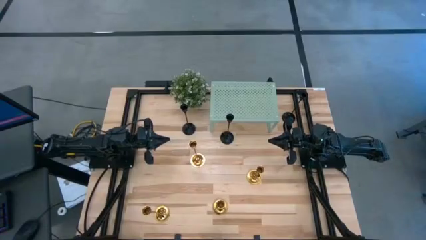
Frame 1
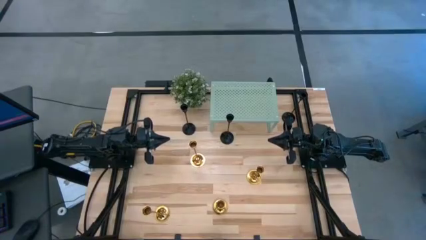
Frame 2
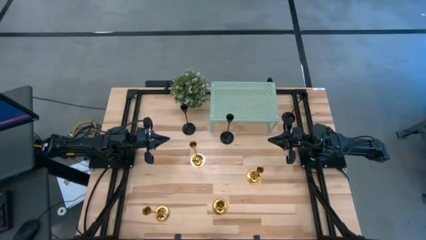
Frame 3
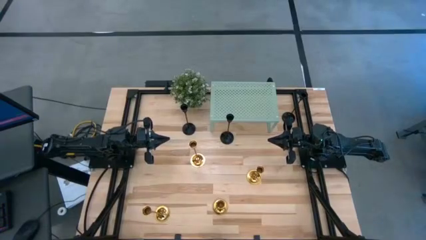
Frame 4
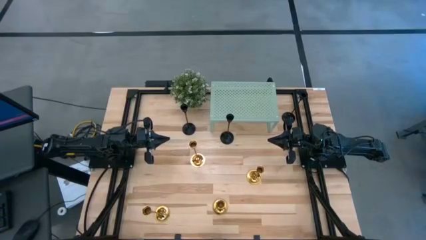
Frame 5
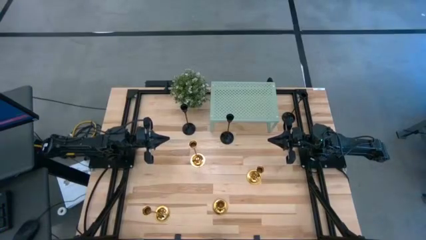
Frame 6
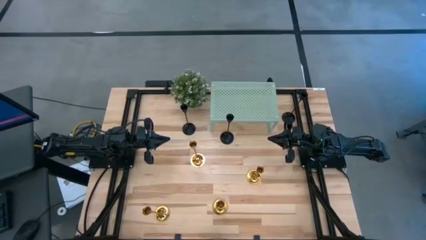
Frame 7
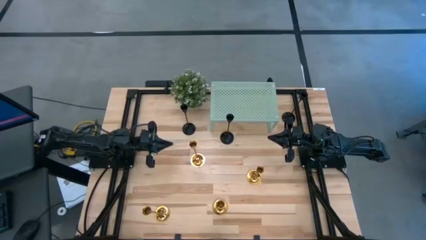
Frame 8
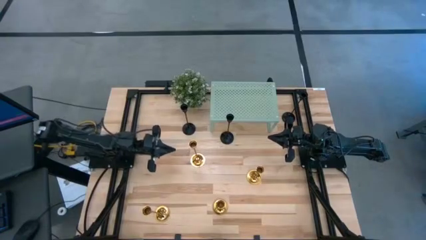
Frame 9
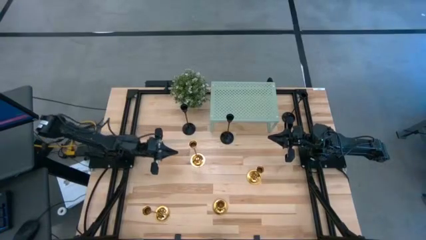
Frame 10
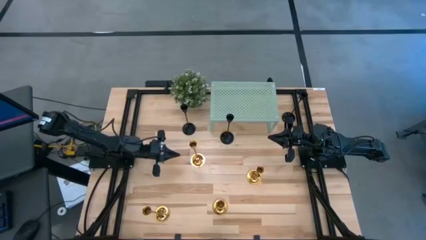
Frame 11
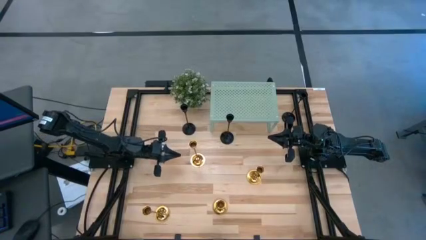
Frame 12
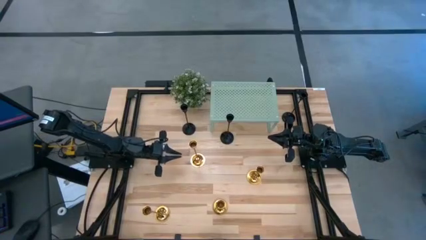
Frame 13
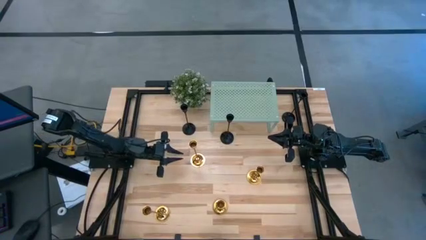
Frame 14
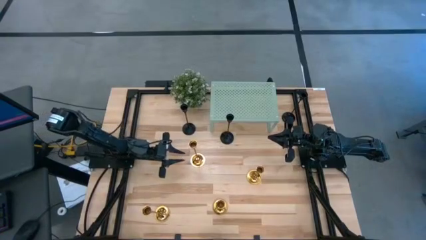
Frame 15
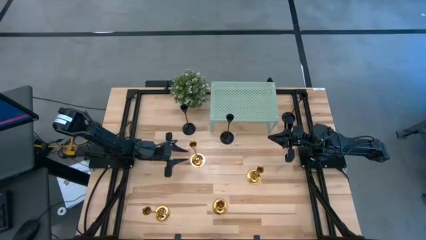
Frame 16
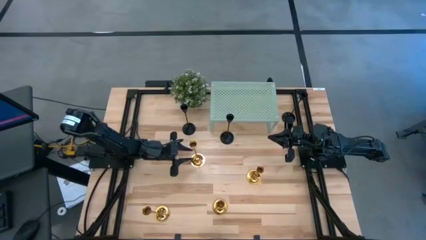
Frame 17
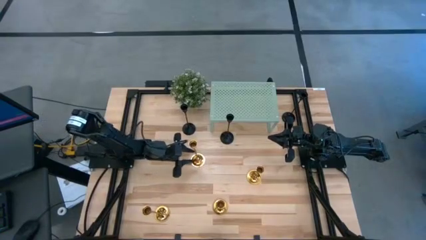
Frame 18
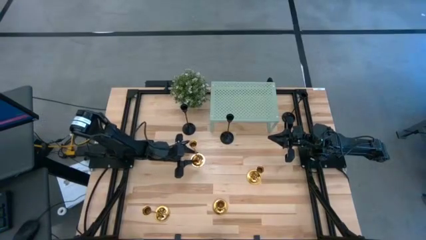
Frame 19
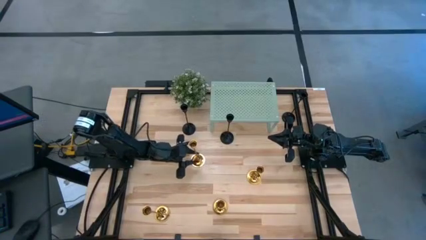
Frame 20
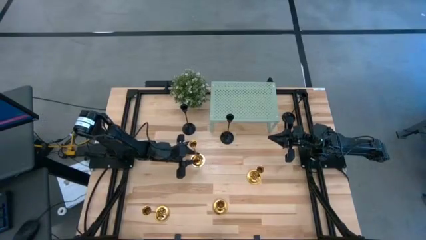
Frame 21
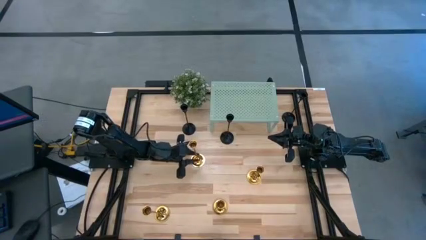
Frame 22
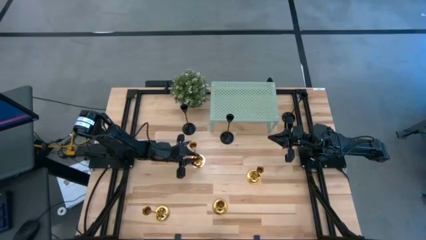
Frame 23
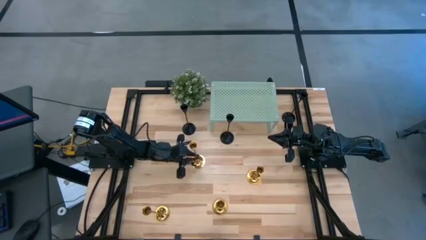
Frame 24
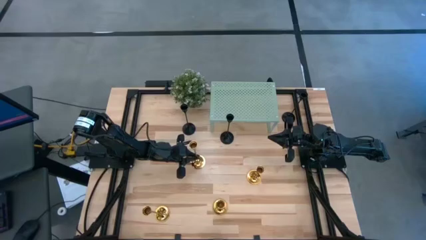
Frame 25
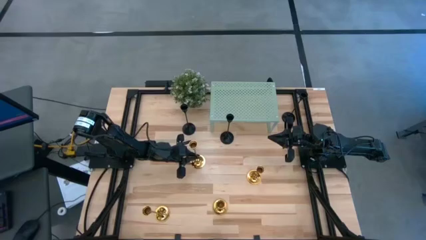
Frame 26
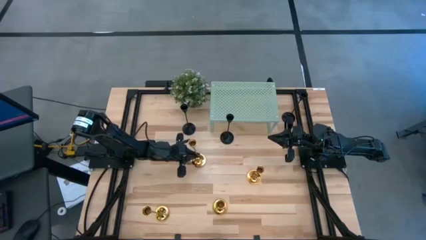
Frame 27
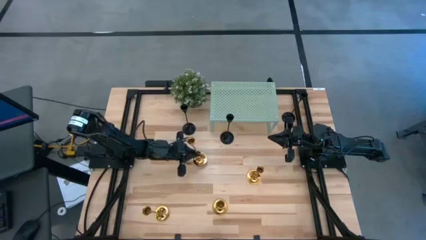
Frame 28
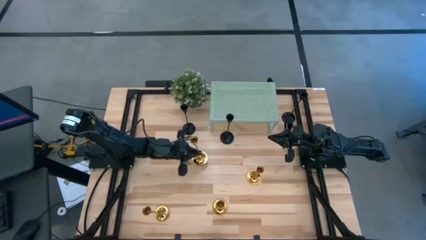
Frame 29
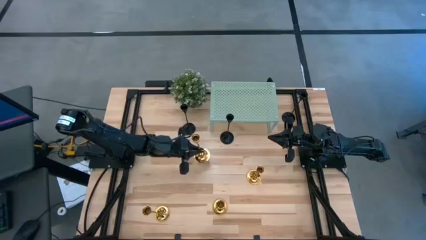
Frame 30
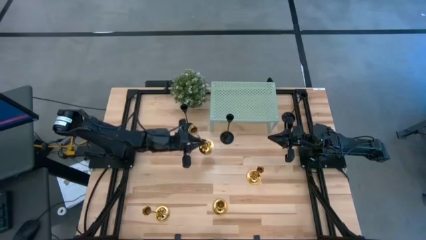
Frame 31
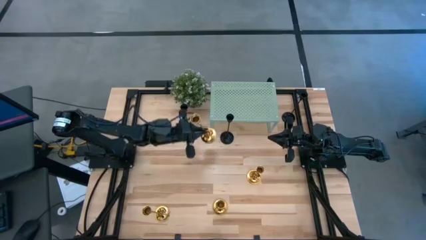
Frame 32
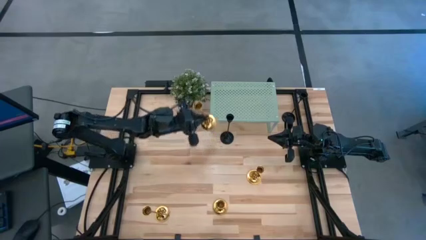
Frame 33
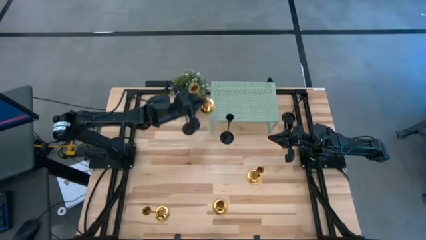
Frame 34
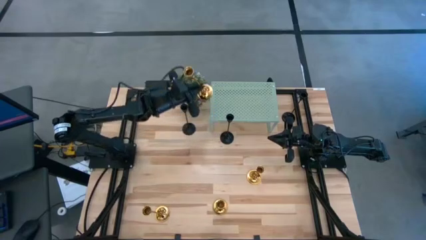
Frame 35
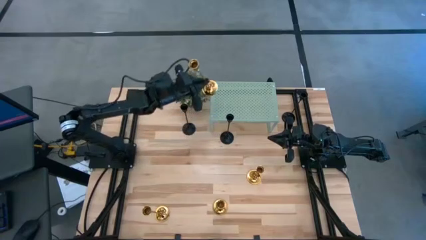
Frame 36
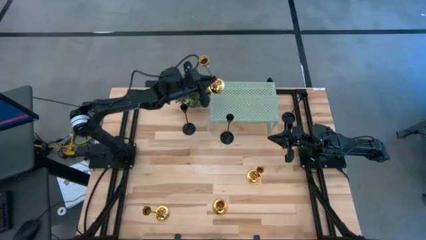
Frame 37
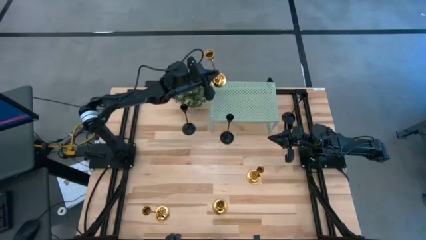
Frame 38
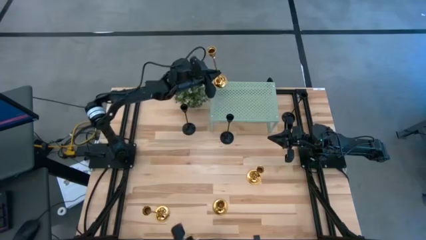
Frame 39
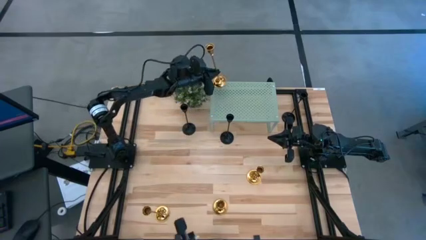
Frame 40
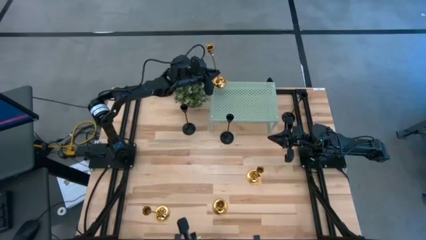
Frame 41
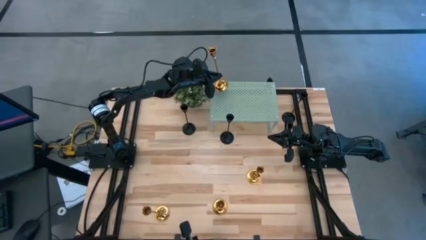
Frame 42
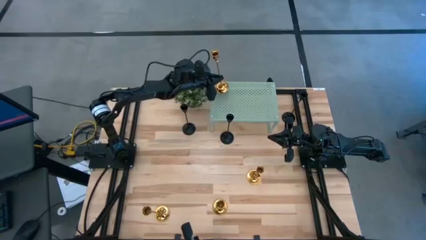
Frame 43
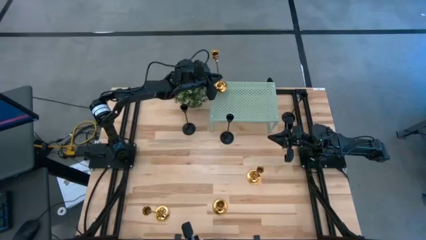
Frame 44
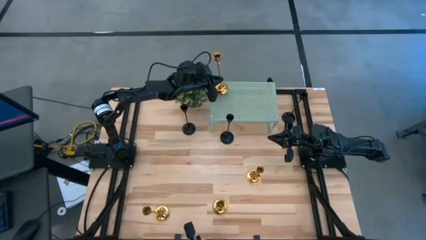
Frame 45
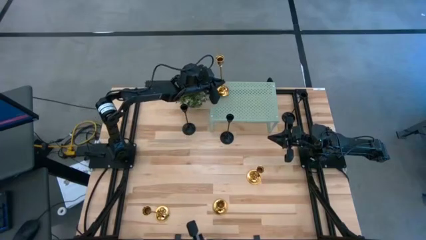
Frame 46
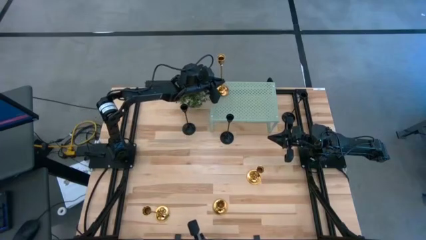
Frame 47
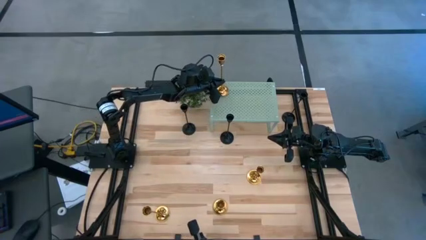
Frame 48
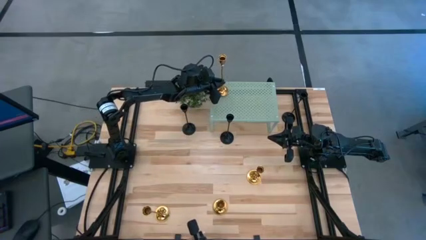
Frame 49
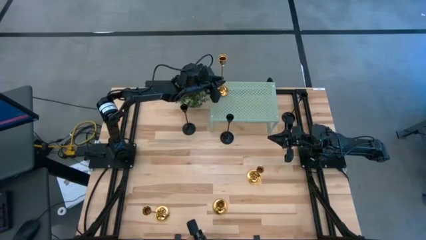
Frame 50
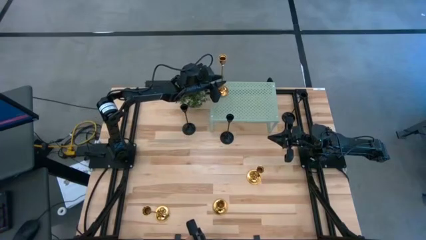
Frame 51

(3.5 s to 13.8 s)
Task: Pick & Place candle stick holders
Put the gold candle holder on the shelf

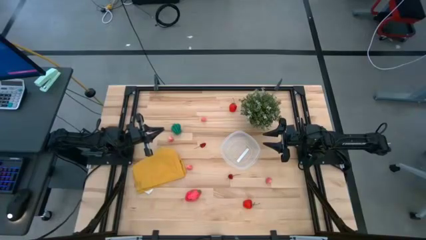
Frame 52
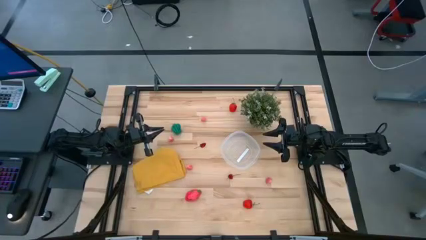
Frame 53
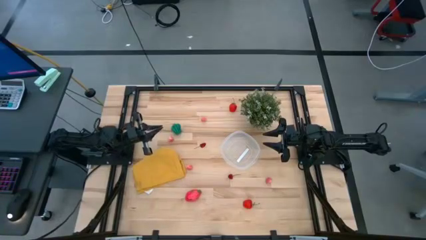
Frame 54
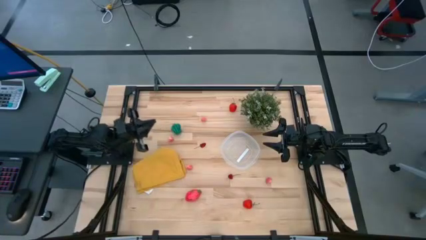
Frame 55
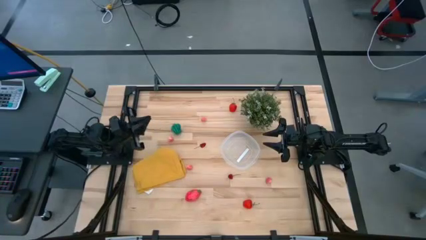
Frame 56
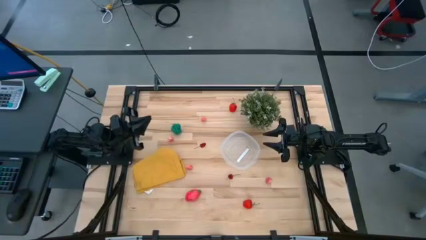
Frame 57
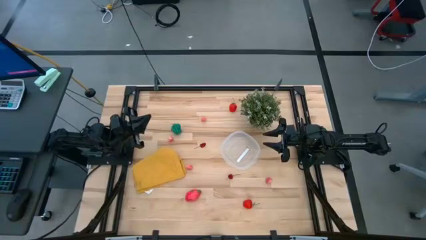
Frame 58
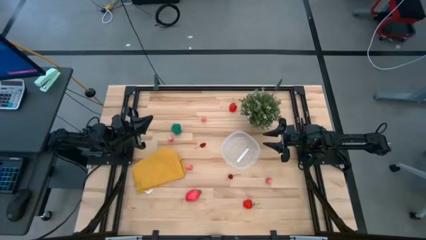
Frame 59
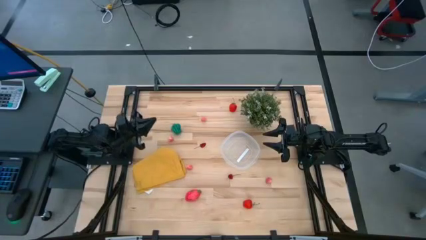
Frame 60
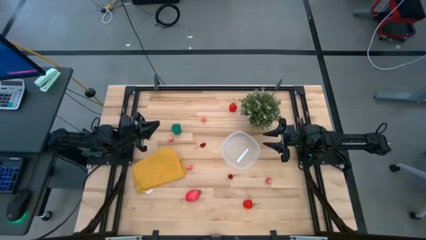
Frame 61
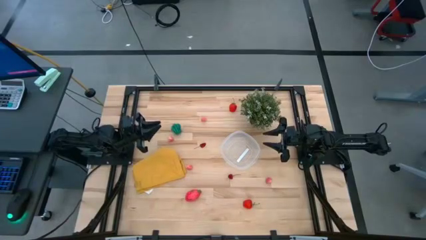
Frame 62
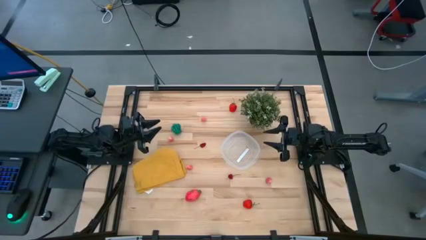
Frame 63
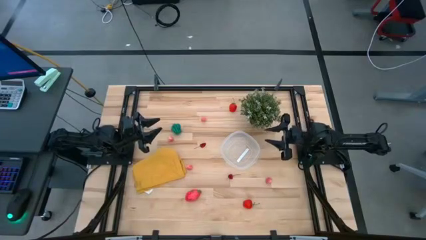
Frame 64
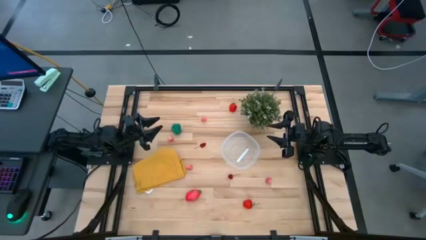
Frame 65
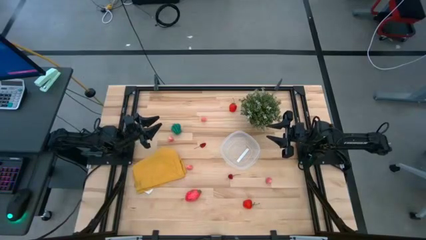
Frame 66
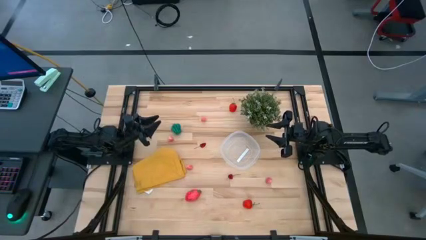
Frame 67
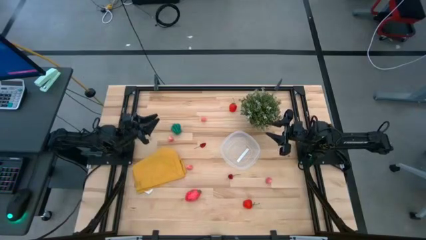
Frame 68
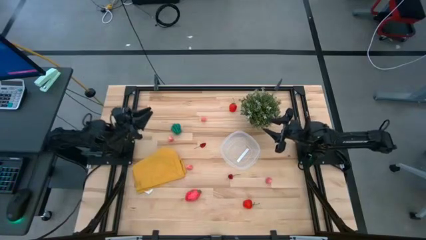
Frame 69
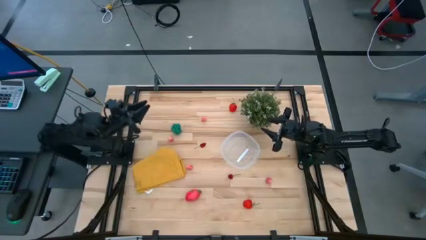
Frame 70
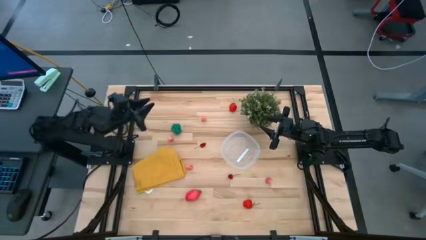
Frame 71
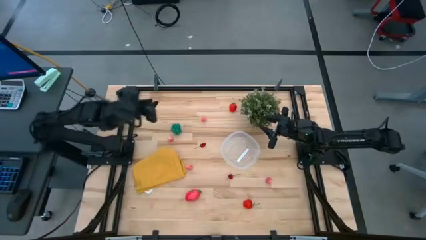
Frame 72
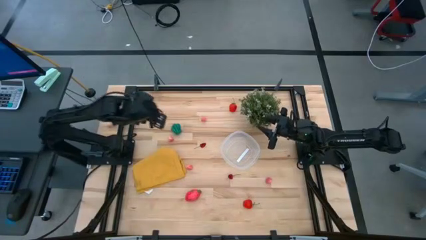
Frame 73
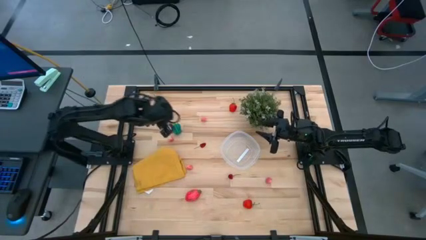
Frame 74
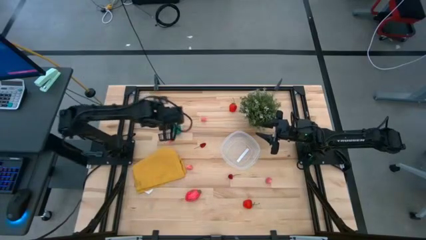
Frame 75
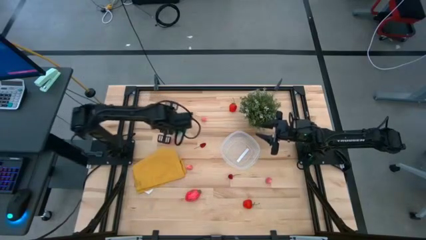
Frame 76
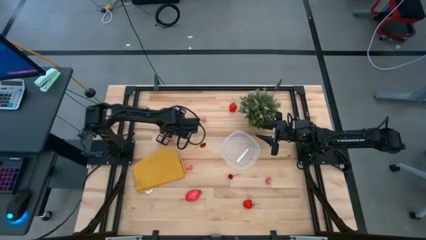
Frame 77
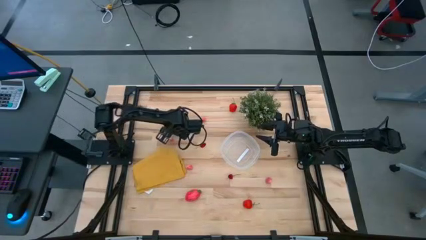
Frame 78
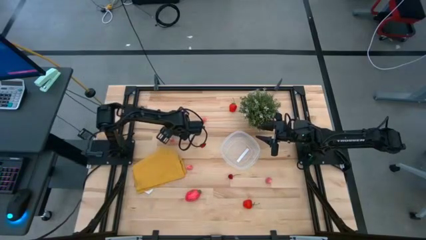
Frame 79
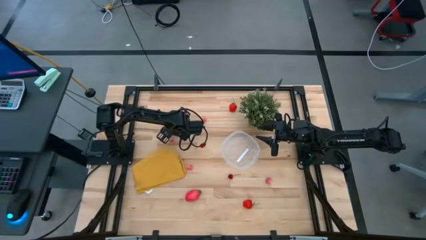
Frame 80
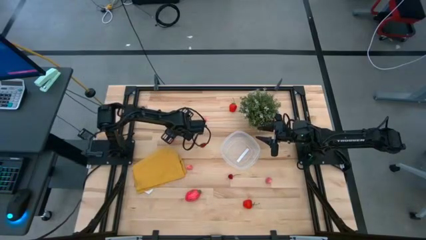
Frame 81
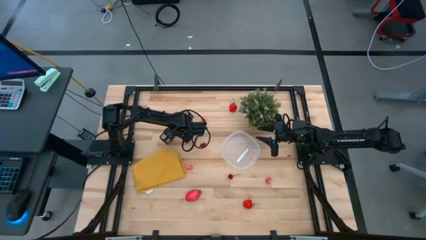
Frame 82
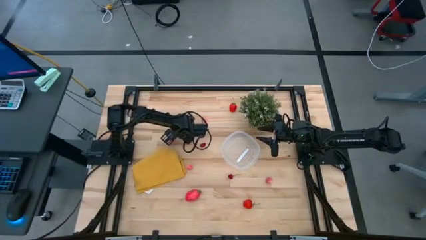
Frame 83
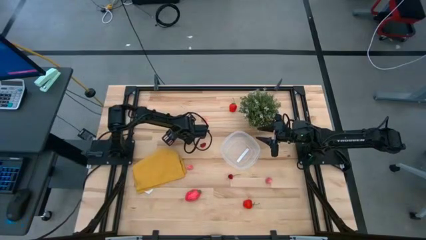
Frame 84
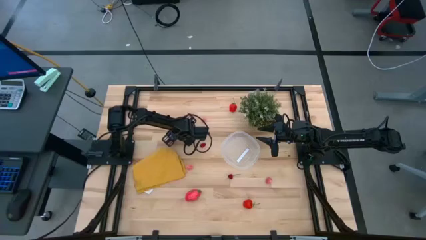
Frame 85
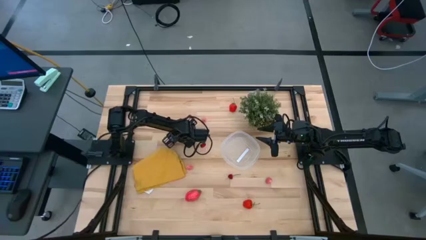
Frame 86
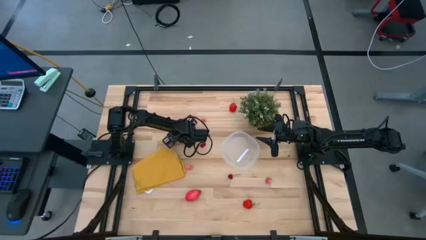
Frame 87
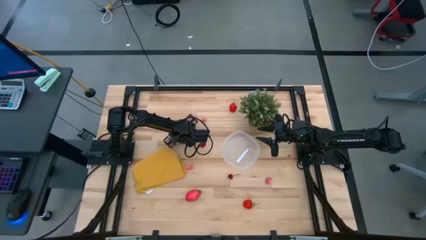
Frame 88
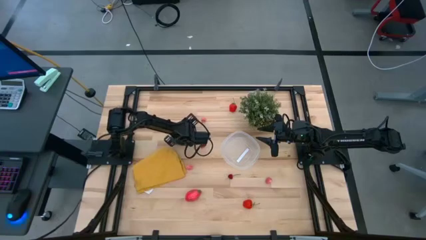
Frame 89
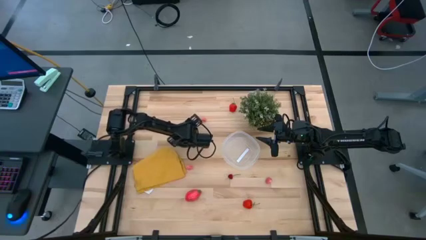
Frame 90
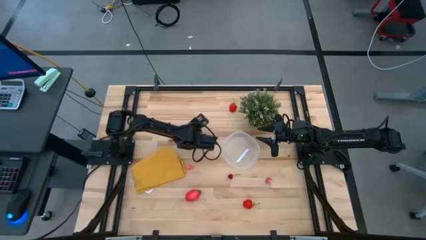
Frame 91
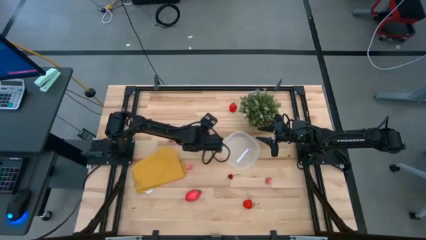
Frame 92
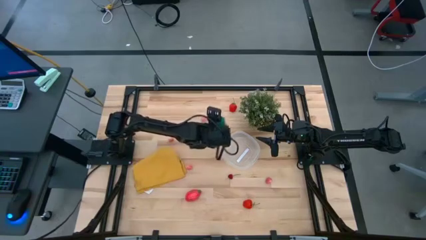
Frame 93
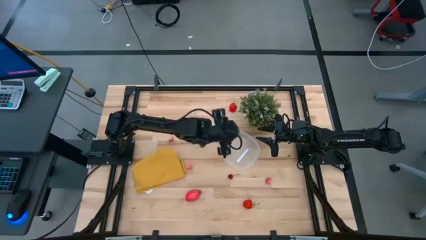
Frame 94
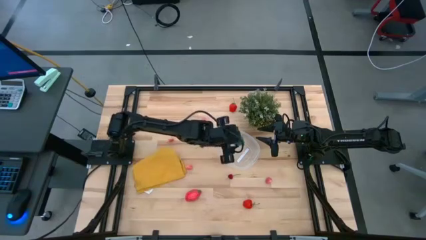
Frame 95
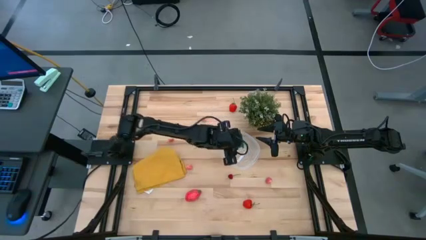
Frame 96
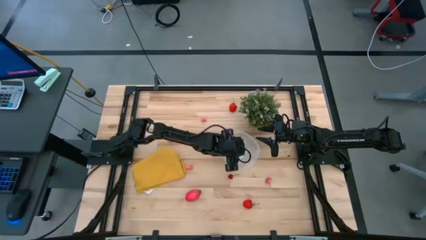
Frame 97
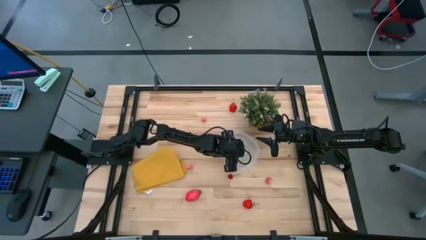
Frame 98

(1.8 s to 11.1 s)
Task: Pick and placing Produce into tupperware
Put the bell pepper into the transparent bin
